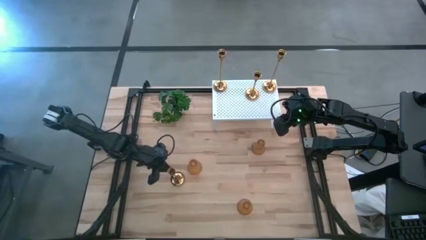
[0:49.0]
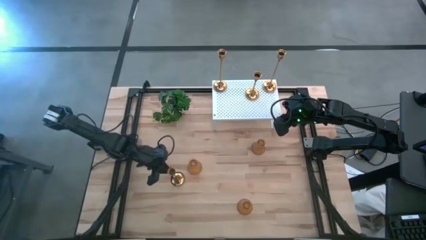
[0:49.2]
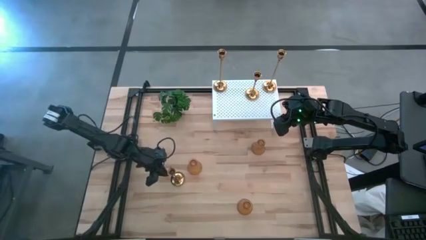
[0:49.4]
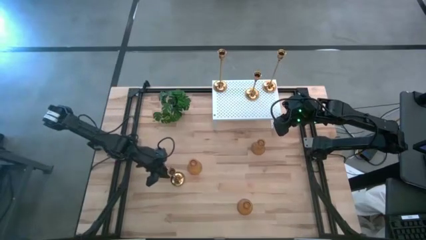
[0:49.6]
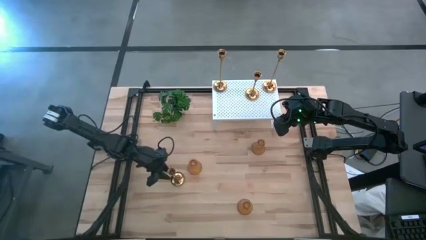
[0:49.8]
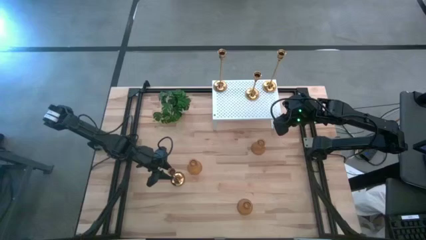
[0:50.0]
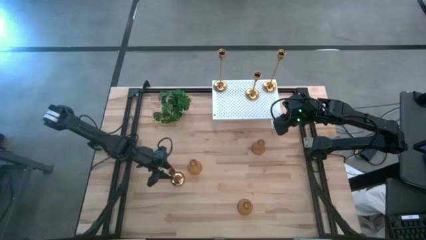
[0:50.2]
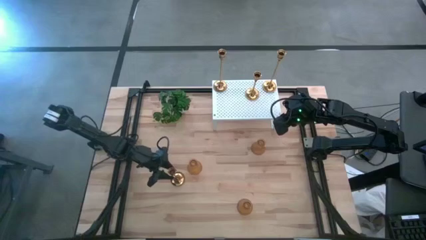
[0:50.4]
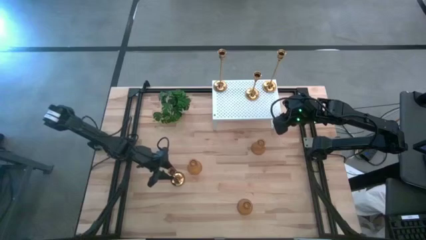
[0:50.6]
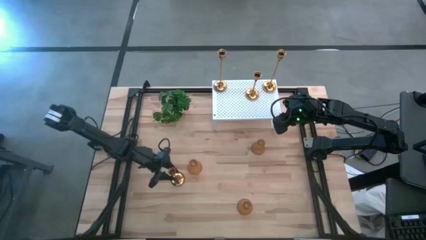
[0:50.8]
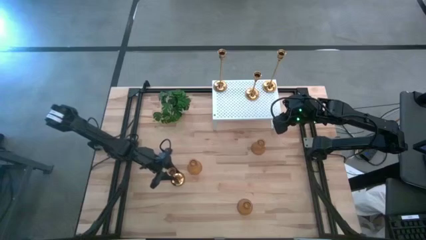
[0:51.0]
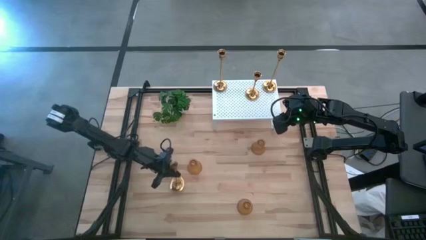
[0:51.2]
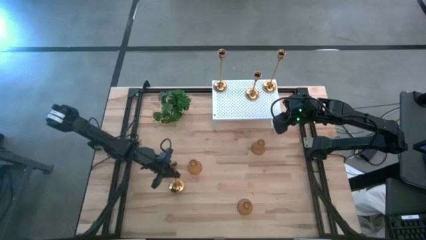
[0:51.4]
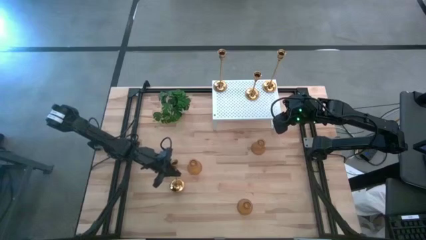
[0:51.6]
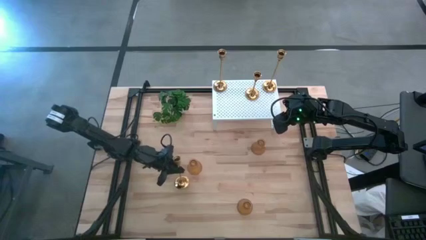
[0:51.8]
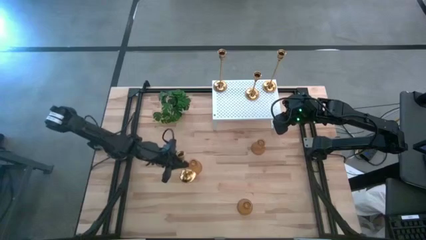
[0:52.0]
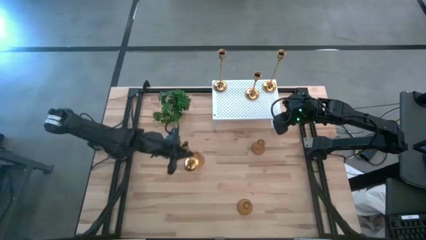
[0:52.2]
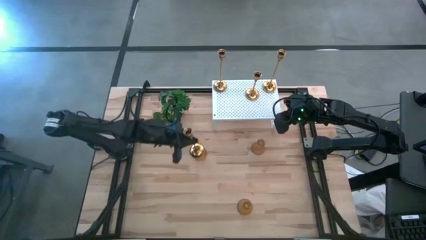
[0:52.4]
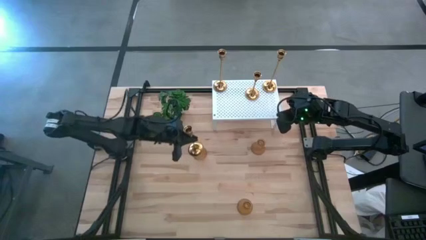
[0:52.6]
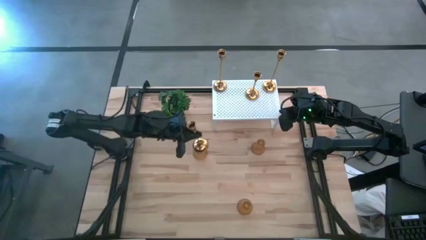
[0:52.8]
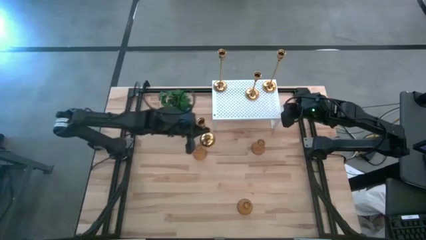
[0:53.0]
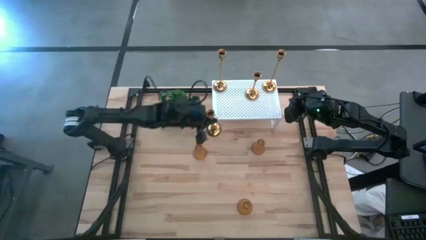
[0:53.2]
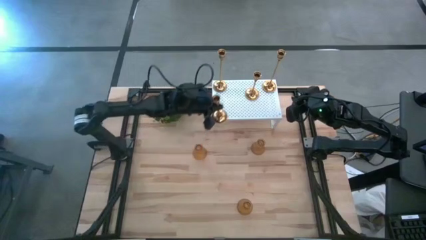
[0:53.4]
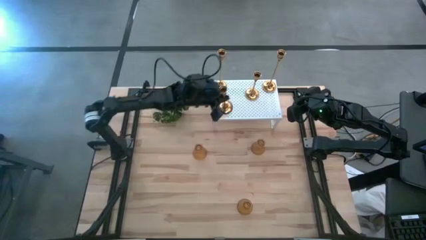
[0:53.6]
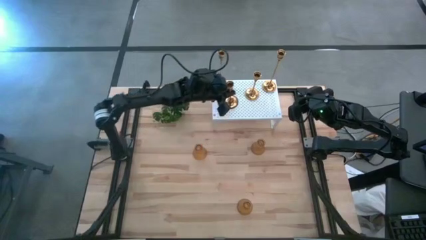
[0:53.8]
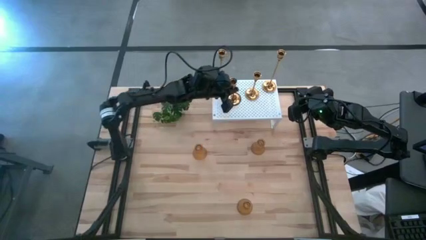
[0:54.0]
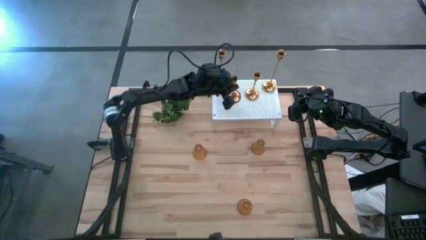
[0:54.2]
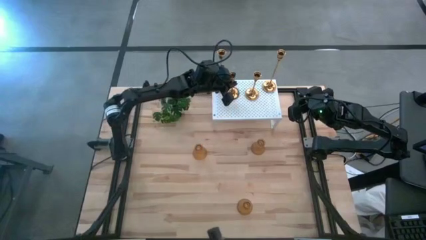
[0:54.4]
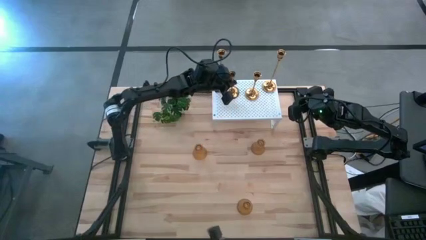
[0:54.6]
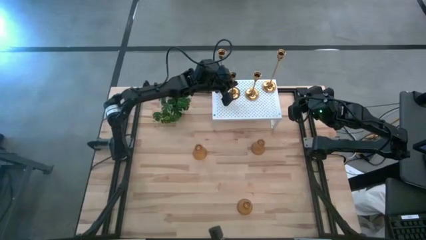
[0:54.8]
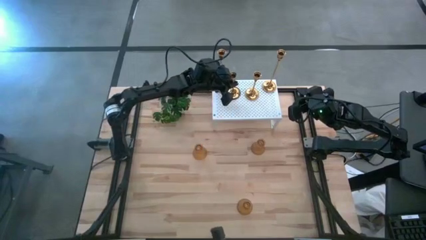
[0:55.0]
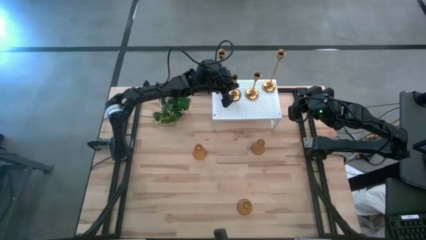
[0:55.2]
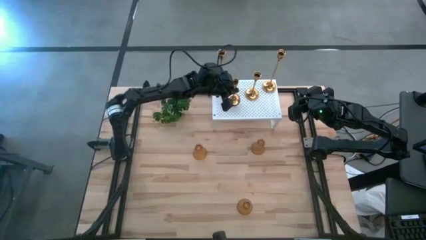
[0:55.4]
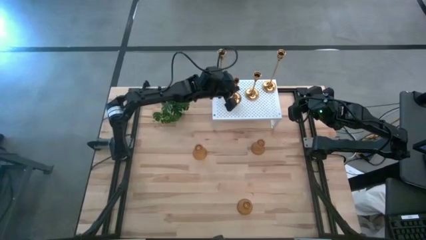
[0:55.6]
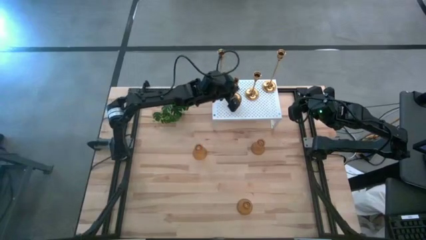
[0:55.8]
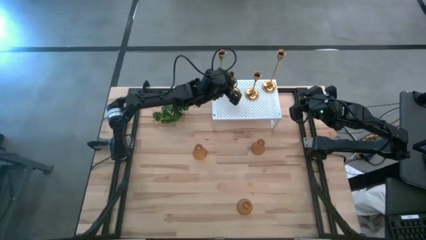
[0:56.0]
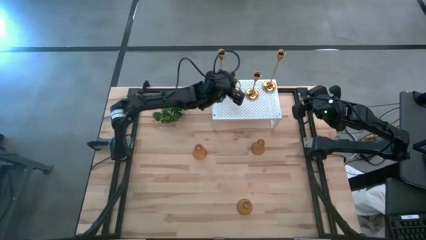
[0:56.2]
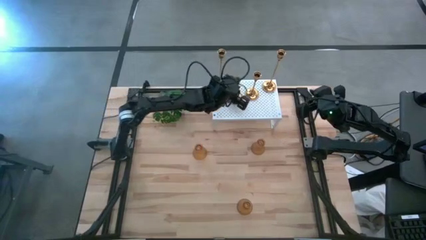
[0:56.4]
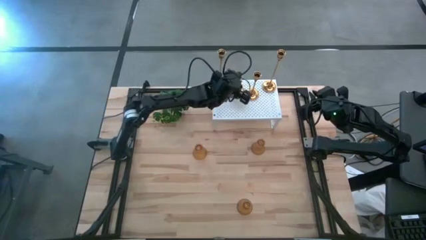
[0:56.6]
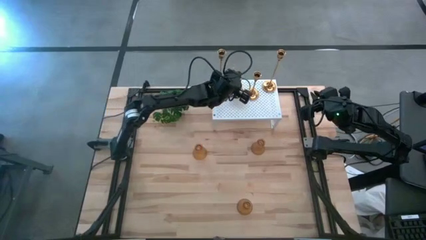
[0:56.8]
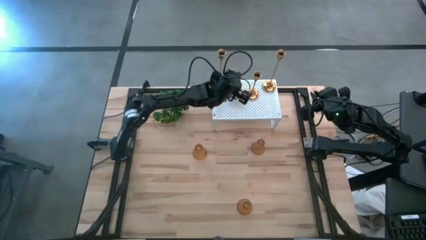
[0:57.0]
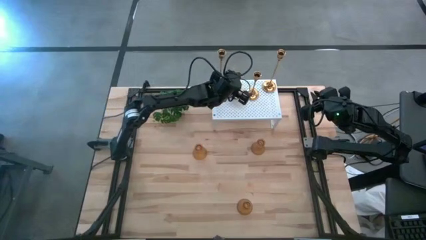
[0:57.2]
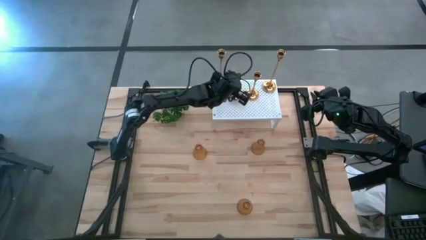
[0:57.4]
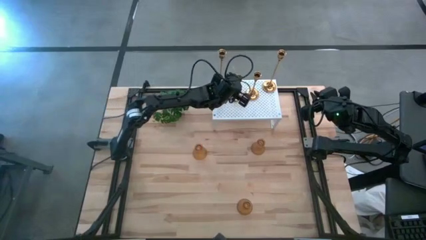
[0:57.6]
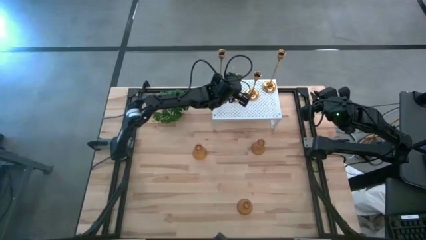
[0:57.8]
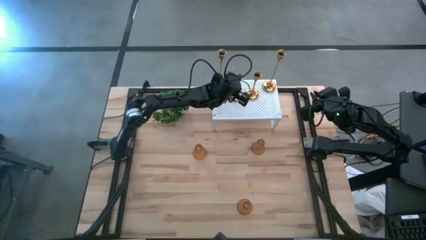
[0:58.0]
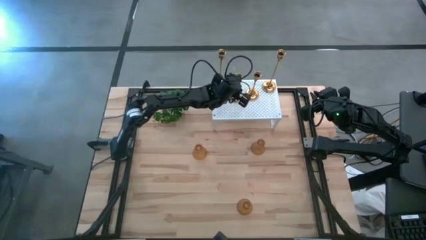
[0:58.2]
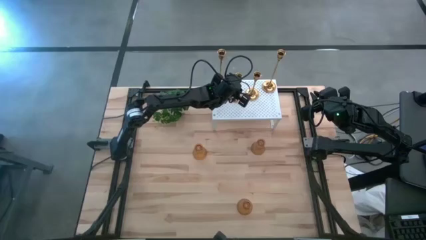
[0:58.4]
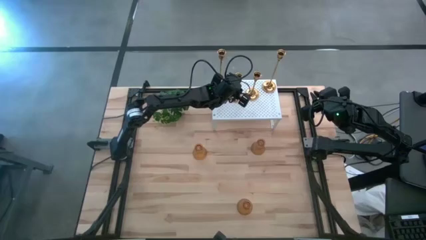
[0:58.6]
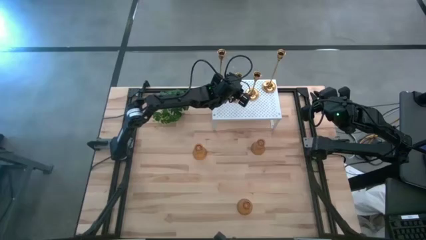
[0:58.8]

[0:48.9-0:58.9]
Task: Pick & Place candle stick holders
Put the gold candle holder on the shelf

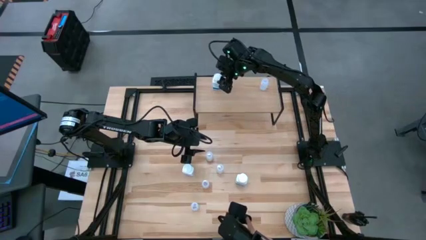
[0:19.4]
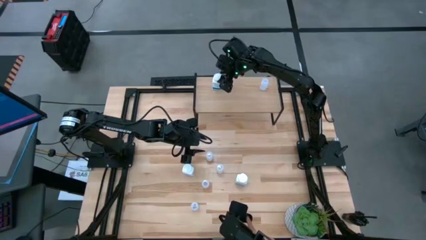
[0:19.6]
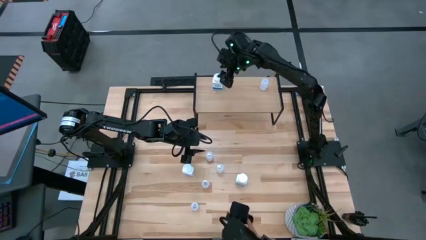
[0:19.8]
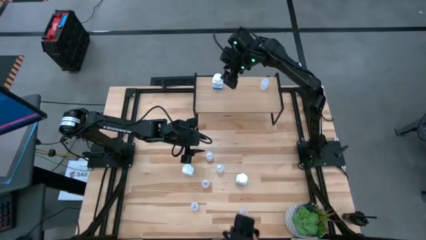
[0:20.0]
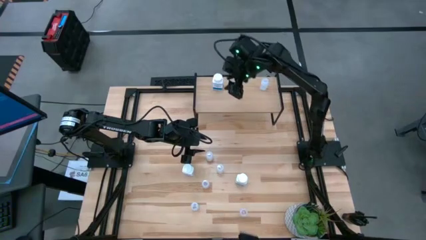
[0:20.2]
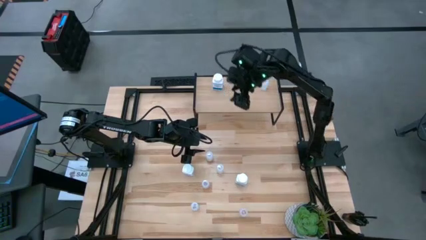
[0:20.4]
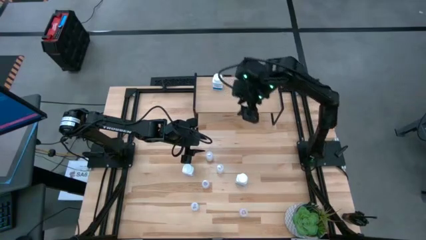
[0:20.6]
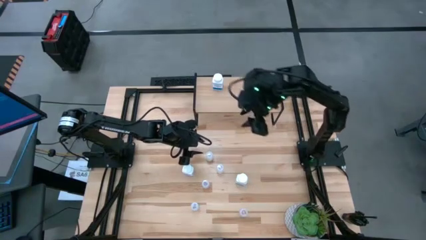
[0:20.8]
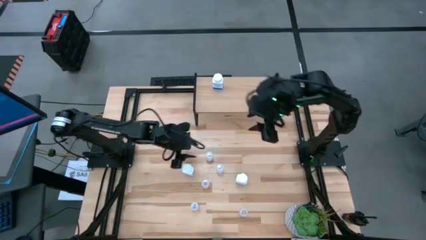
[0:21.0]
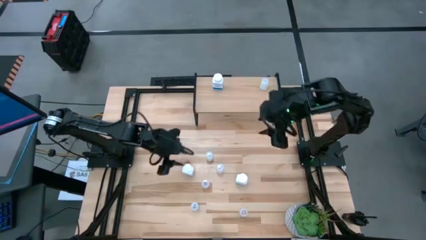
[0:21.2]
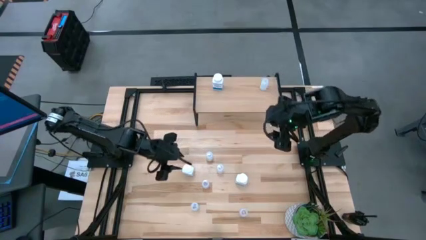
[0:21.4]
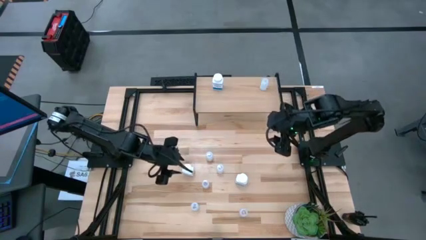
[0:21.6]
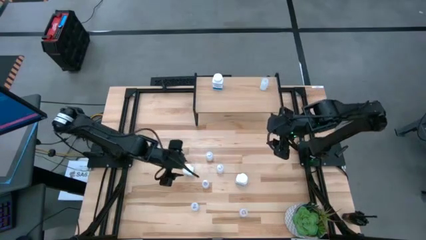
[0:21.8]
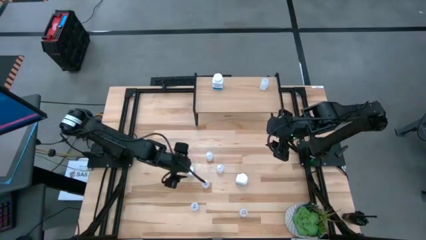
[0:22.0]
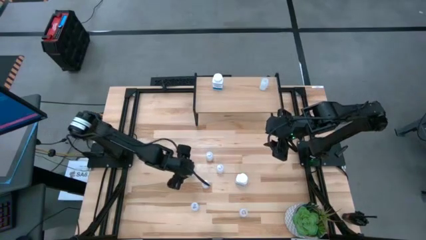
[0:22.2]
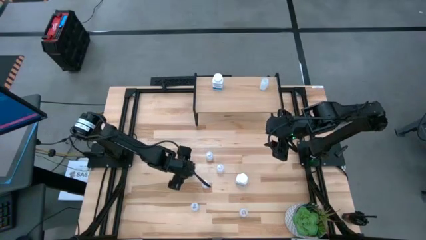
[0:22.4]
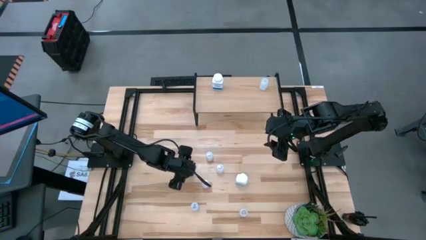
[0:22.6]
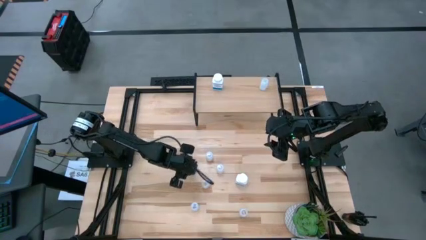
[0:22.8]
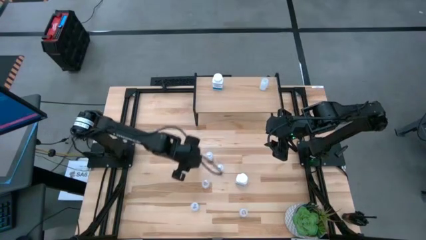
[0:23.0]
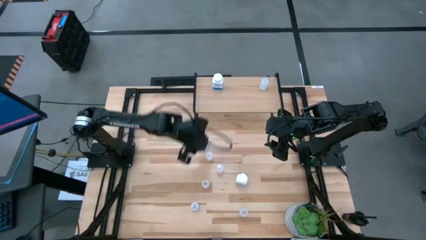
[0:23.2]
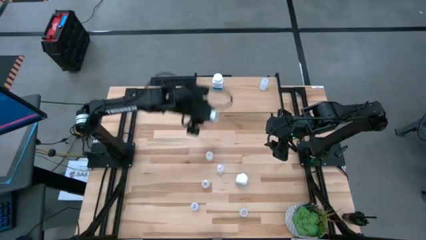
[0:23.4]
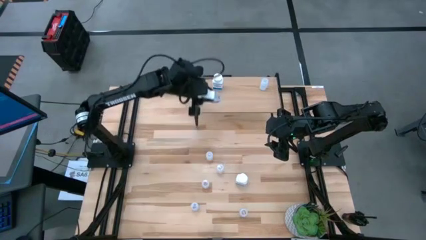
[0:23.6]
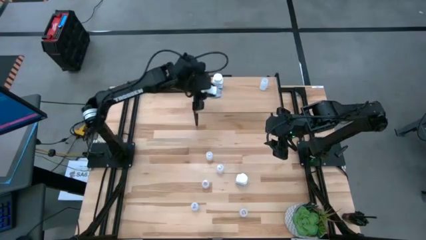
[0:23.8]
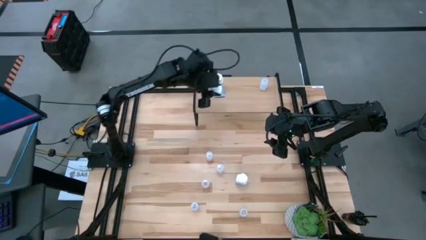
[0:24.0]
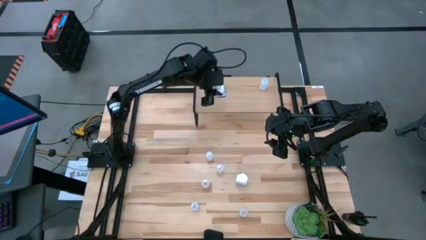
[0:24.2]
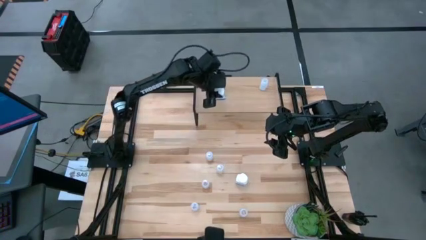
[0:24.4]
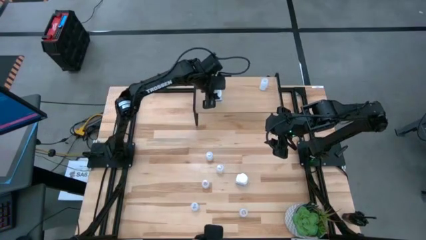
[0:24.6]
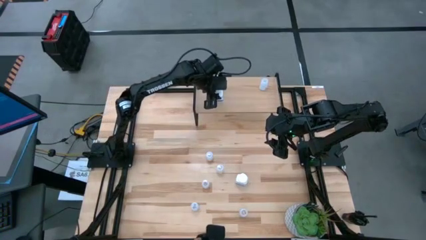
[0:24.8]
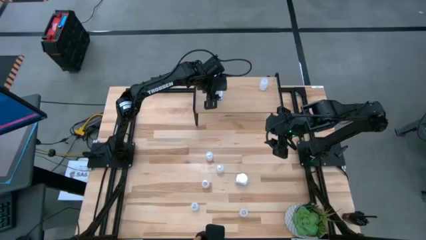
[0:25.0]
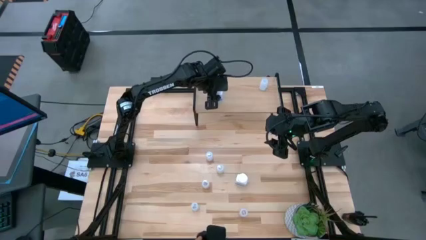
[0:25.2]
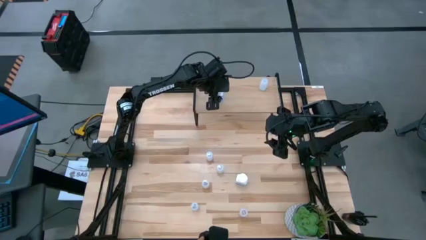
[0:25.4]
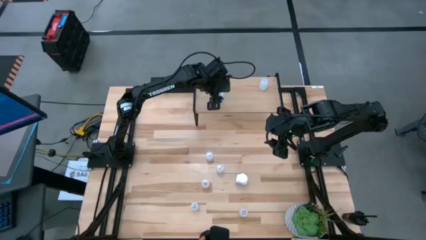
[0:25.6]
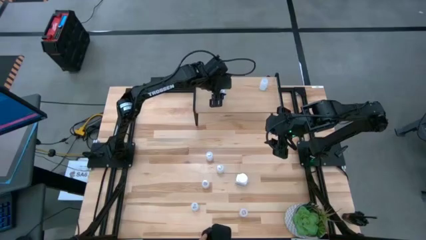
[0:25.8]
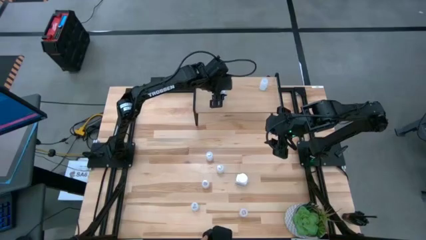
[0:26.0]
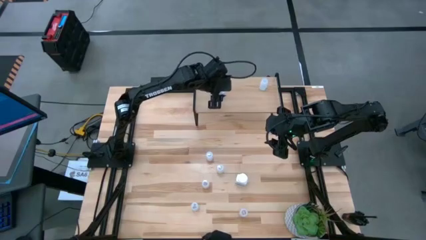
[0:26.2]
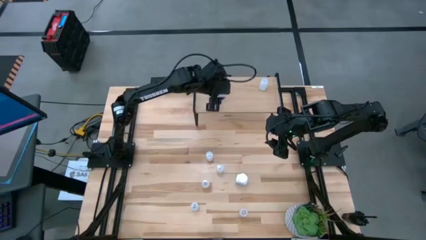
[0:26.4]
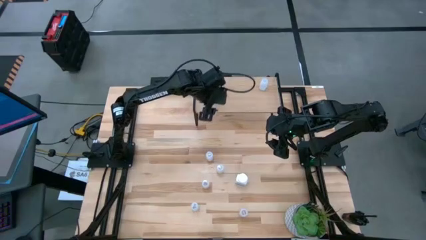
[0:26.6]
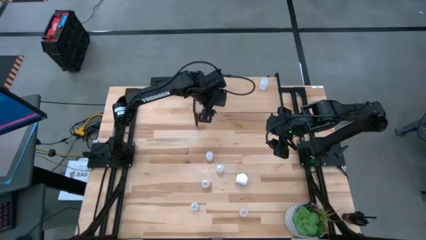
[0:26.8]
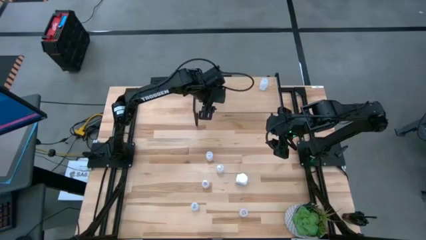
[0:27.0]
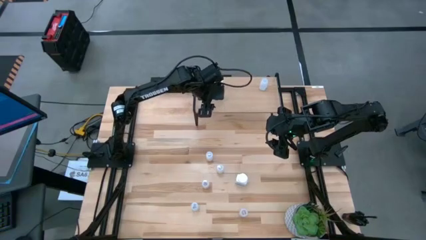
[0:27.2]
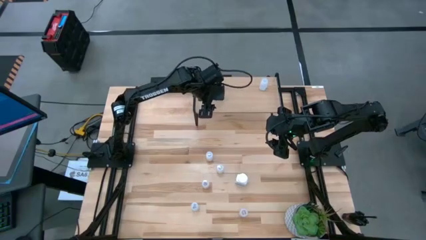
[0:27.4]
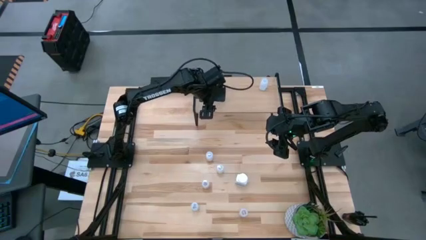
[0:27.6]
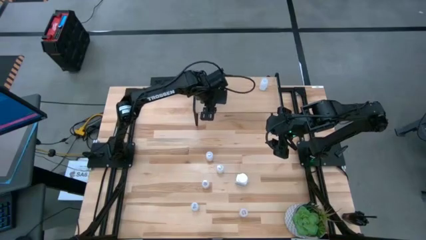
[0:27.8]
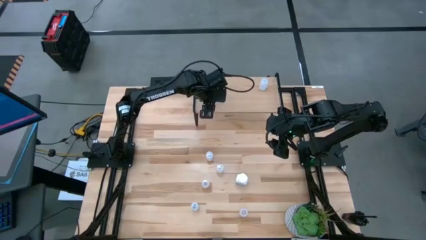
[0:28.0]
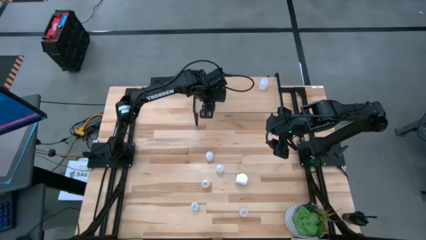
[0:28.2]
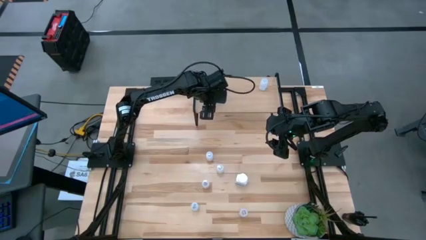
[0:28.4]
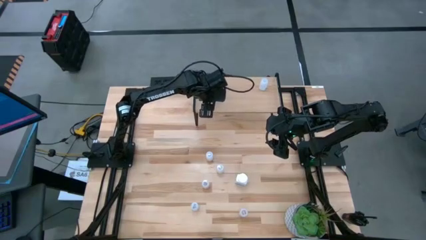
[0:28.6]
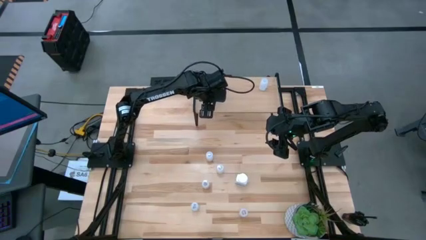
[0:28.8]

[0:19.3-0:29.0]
Task: Pick and place medicine bottles onto shelf by color
Put the top white medicine bottle on the shelf aligned with the other white medicine bottle
